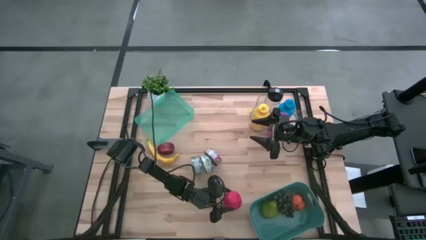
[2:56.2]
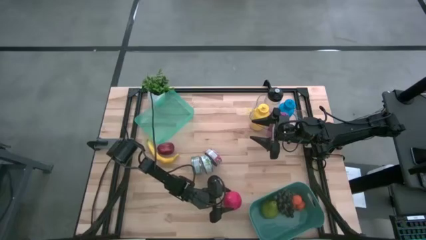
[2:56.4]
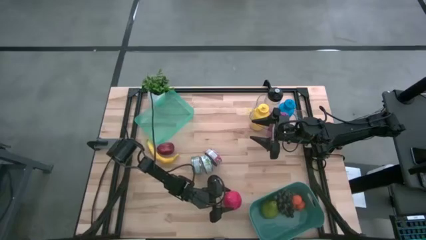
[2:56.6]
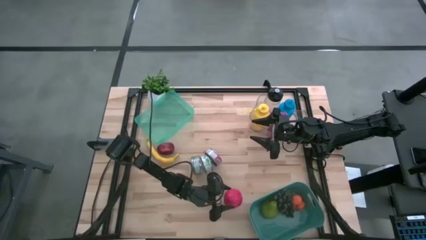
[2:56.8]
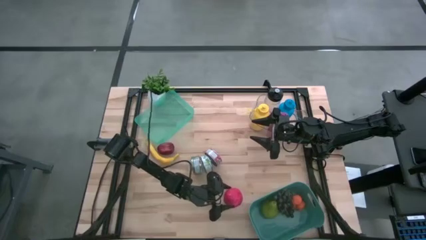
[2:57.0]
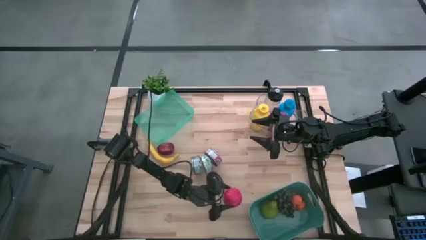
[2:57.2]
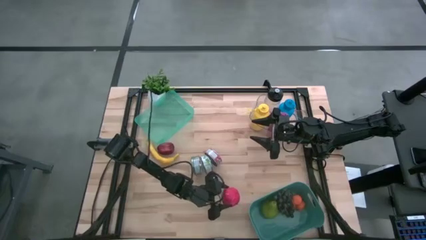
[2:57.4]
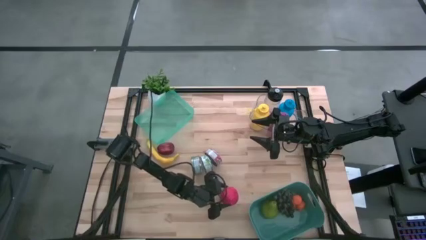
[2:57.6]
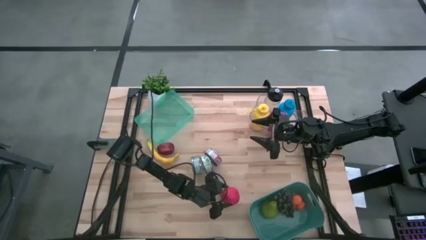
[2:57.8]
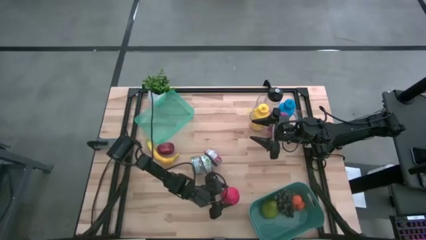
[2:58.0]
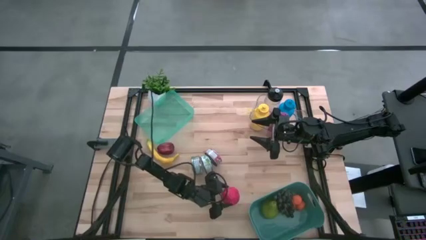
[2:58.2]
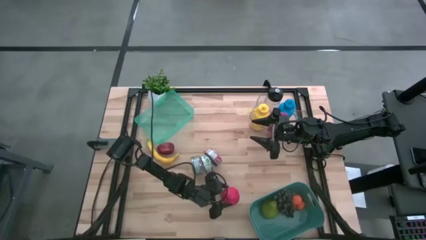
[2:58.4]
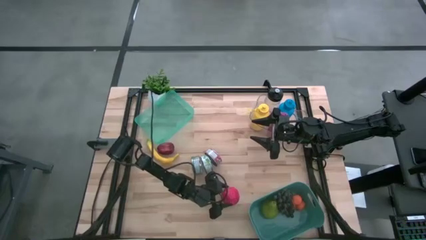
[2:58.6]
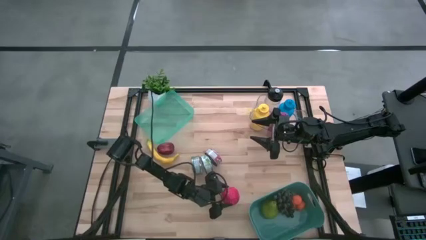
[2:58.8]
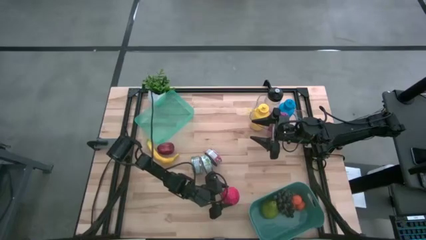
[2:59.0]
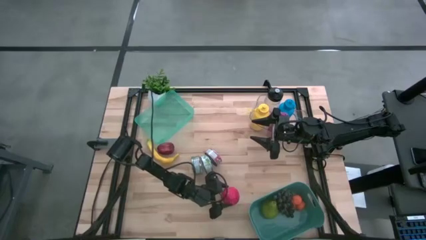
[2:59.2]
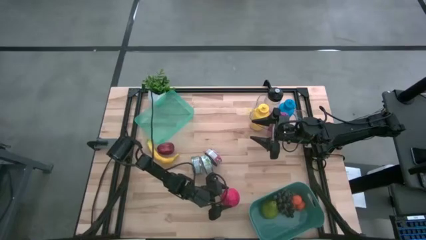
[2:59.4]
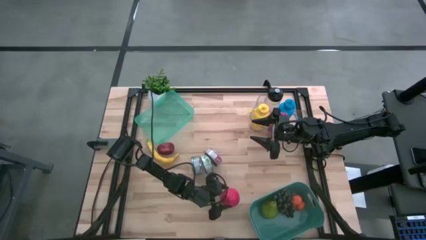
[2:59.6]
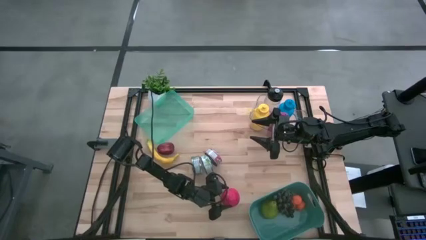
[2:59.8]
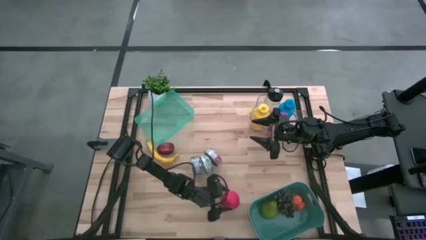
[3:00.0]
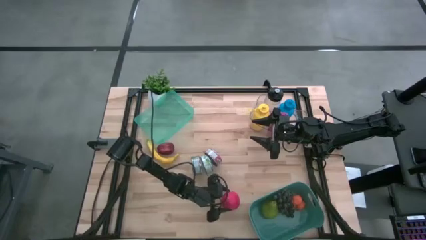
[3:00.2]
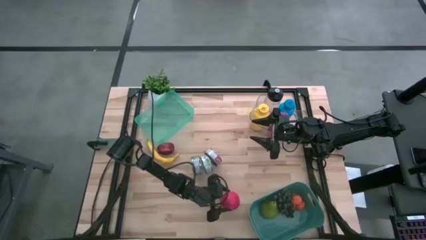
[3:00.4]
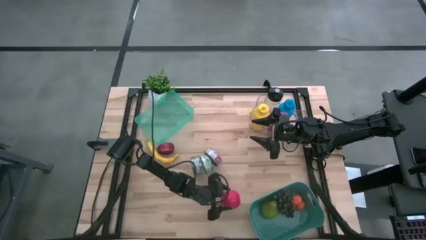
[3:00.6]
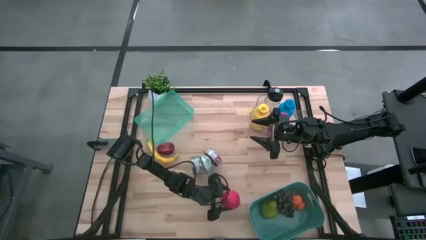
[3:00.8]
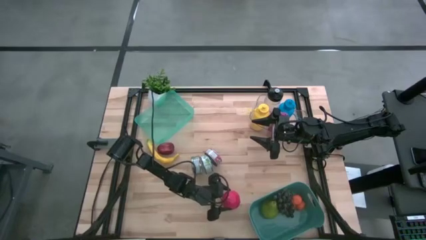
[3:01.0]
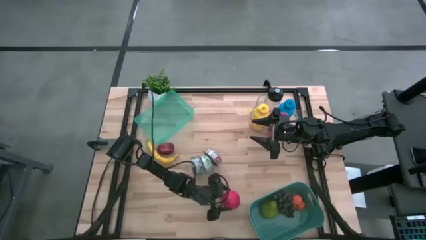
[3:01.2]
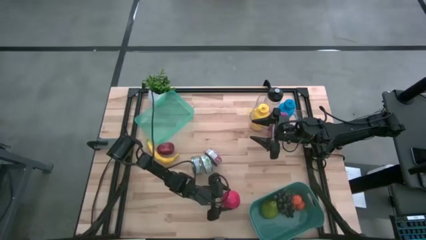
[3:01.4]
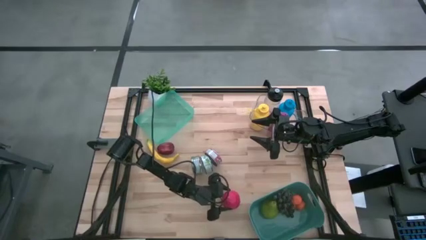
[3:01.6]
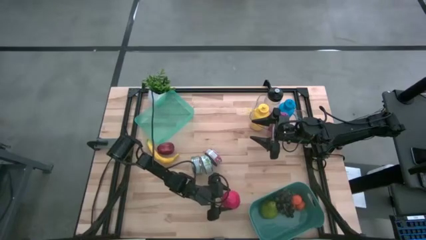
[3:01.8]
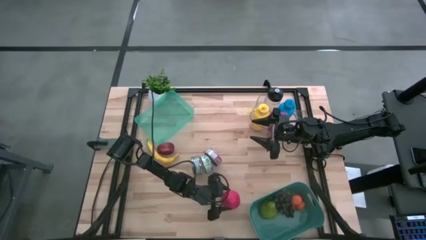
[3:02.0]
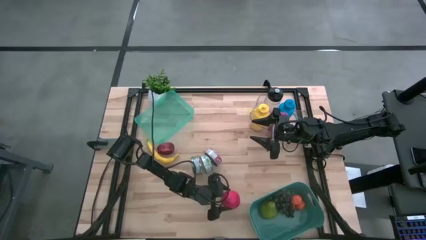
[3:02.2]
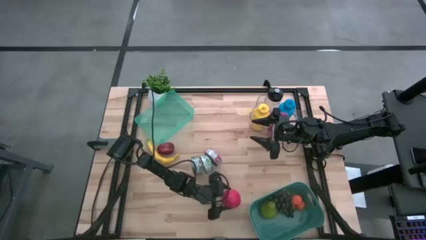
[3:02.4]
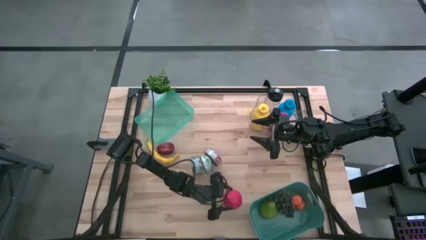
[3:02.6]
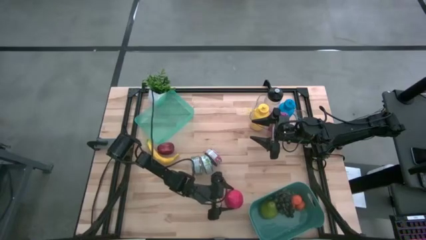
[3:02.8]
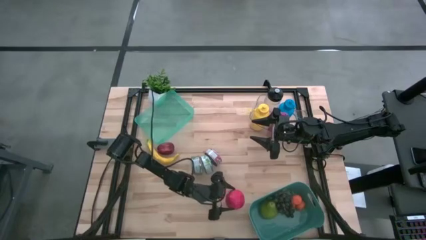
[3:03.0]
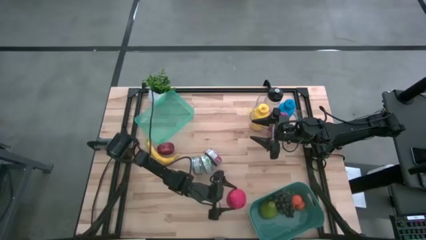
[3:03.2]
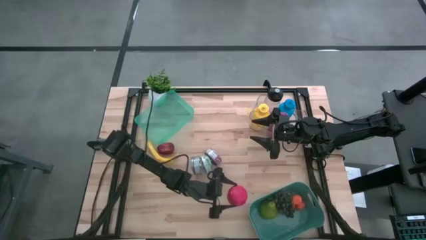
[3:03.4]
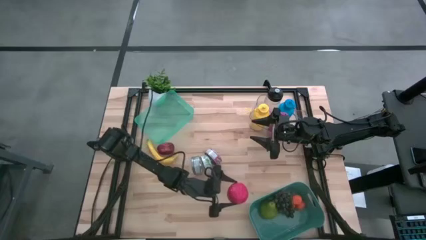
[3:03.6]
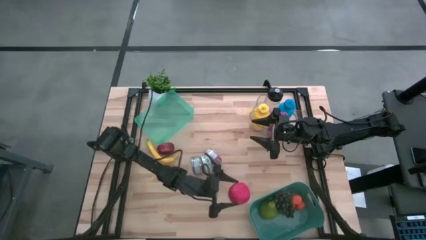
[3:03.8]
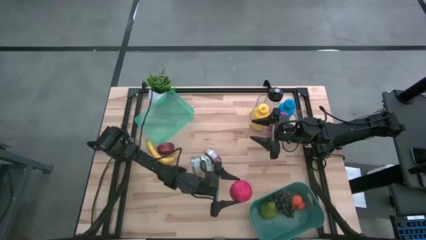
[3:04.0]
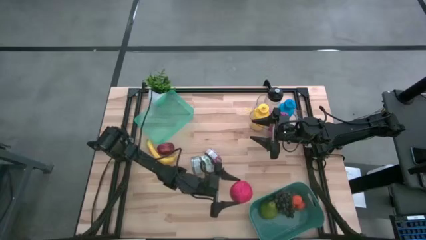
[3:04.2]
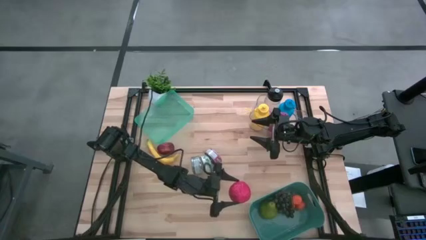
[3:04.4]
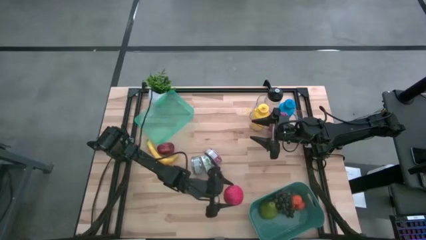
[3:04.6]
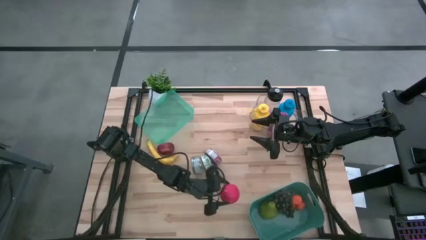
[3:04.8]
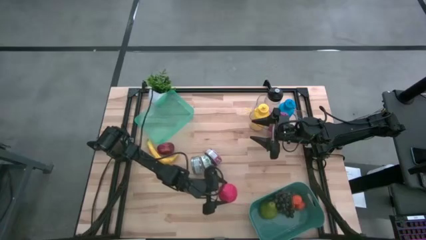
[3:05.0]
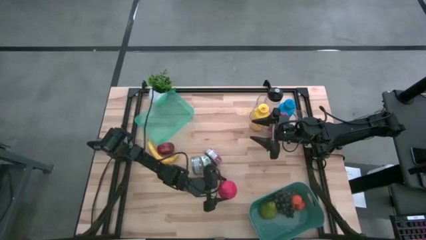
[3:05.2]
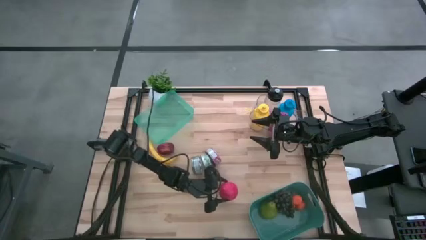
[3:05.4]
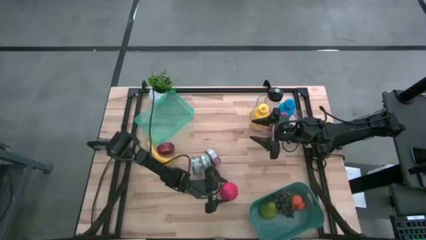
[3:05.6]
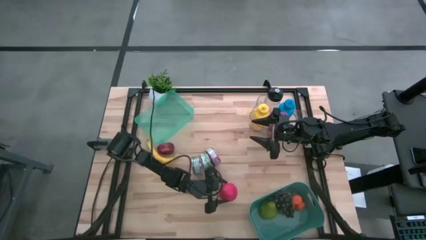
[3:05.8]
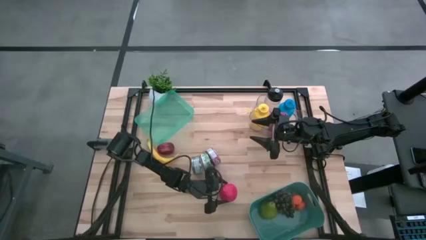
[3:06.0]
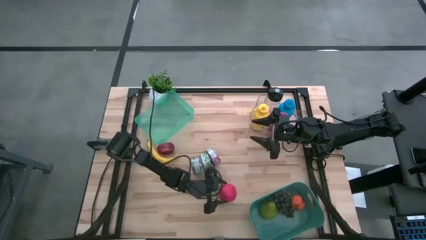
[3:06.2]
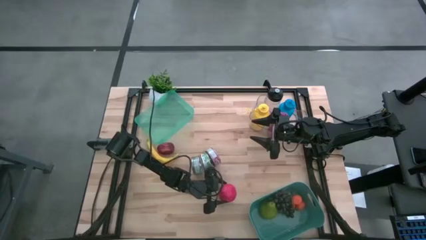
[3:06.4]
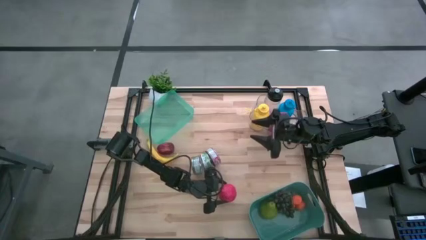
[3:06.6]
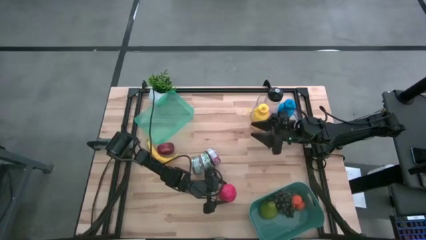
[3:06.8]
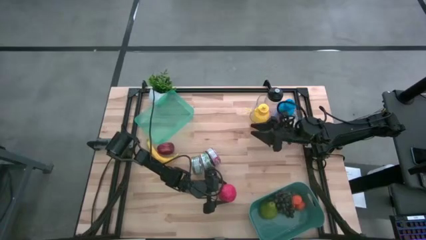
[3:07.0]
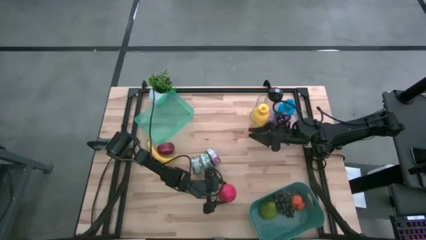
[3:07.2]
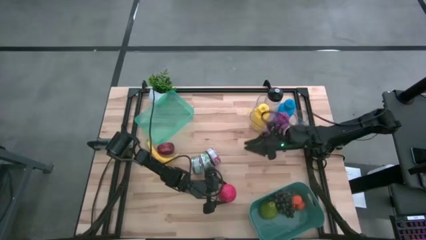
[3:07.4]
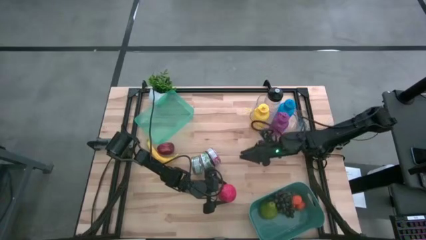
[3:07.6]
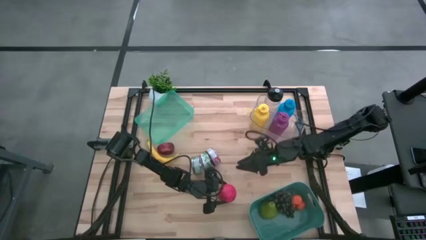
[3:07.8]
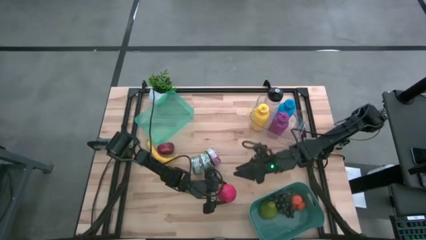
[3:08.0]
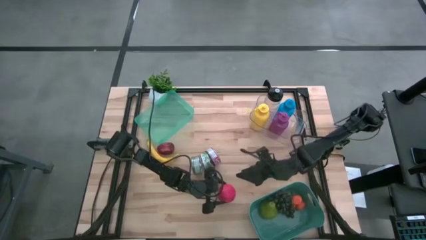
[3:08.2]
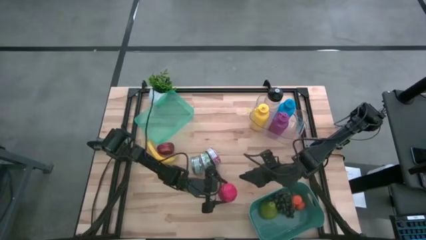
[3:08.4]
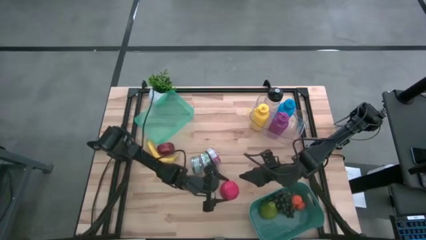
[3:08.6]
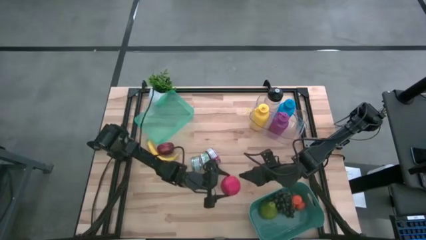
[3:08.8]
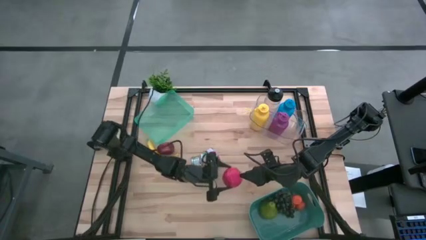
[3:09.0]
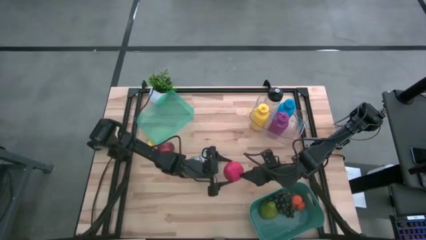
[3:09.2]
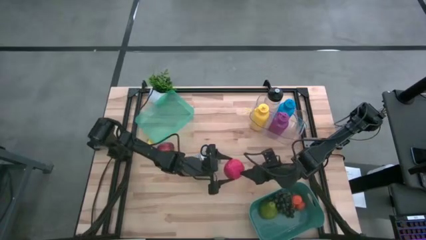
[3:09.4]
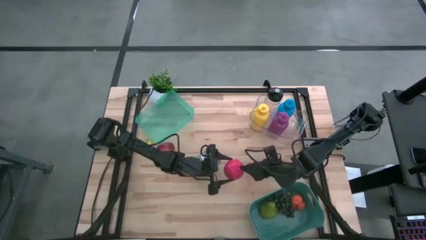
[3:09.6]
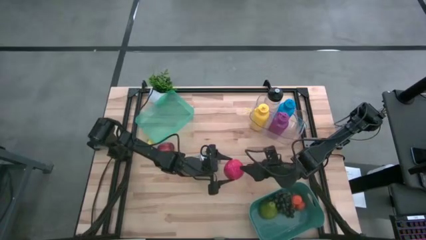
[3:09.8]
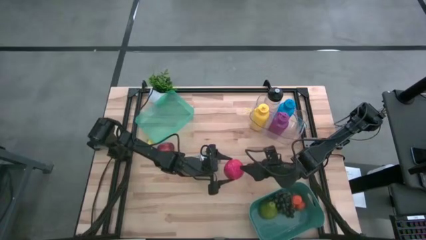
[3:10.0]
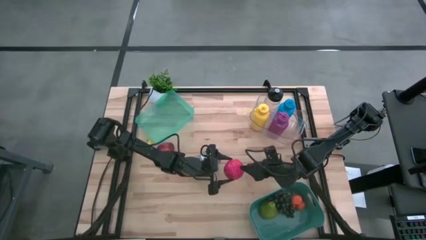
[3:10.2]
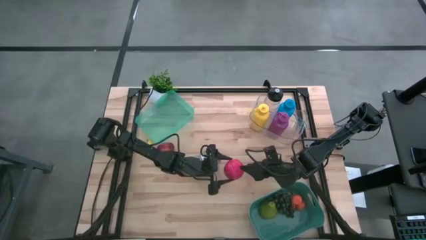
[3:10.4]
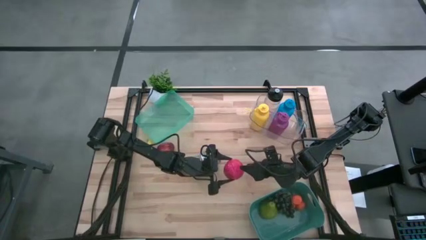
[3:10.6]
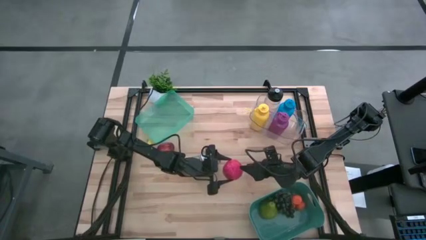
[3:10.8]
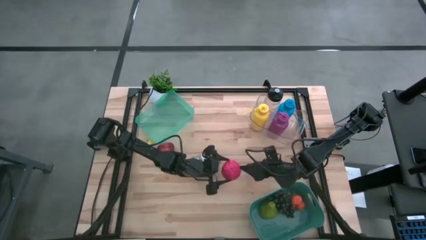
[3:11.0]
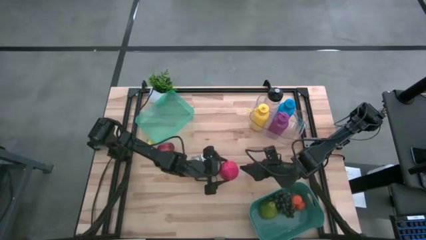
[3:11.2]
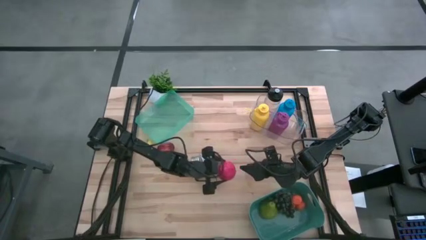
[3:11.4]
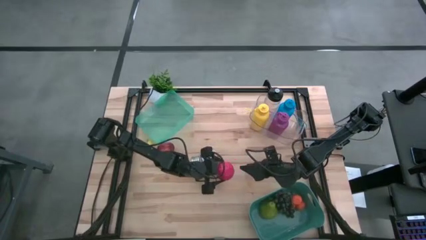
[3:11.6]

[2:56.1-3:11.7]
Task: Pick & Place Food Item
Put the bottom red apple into the dark green bin
